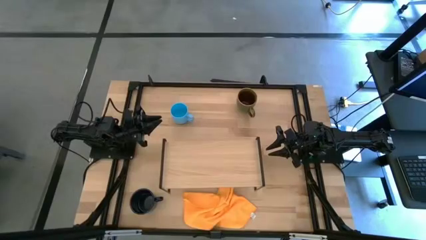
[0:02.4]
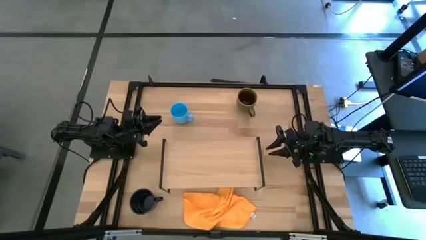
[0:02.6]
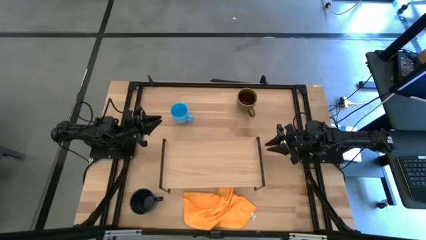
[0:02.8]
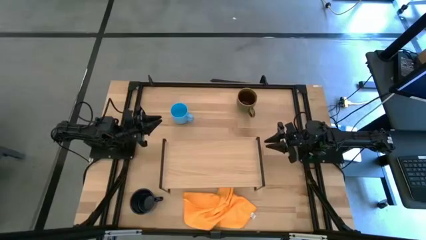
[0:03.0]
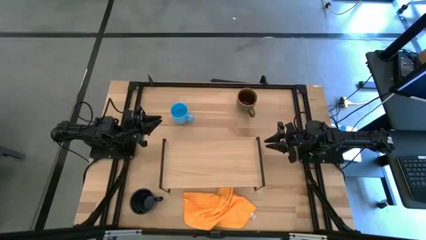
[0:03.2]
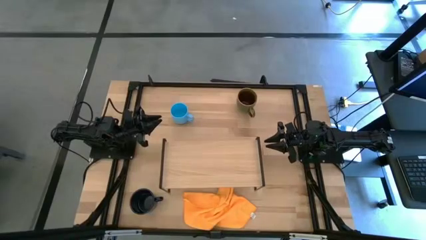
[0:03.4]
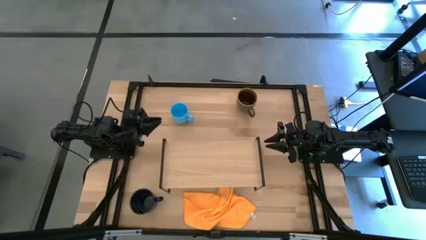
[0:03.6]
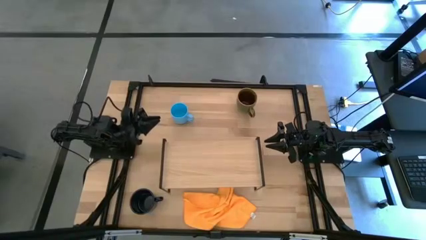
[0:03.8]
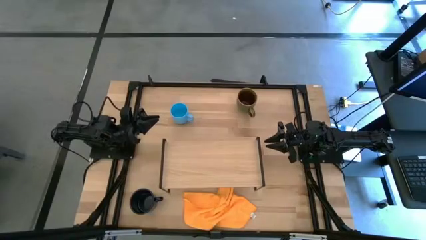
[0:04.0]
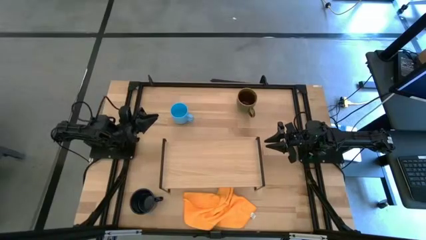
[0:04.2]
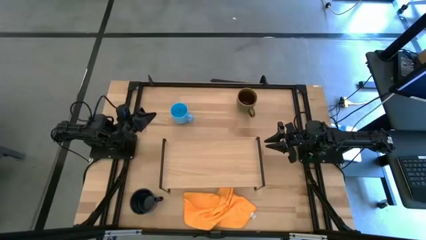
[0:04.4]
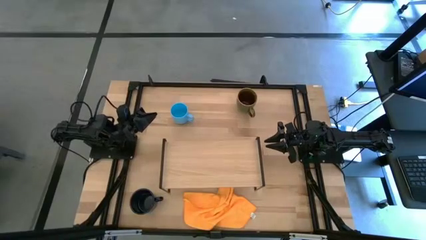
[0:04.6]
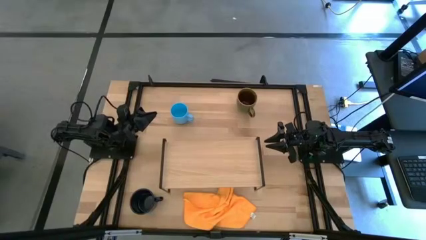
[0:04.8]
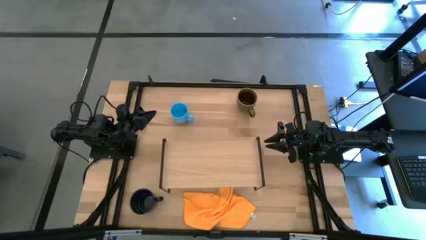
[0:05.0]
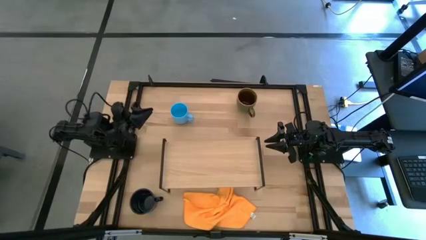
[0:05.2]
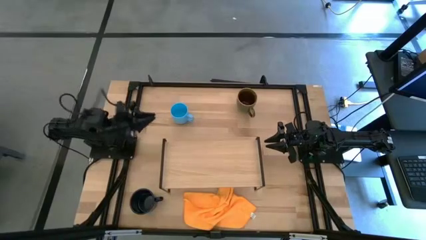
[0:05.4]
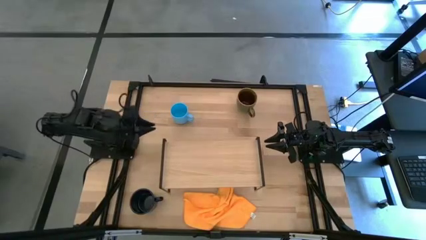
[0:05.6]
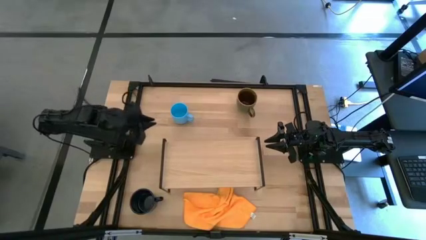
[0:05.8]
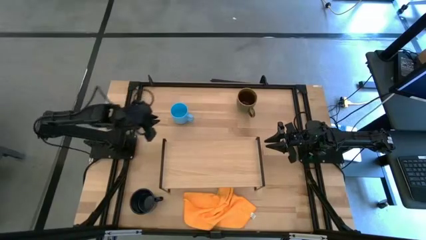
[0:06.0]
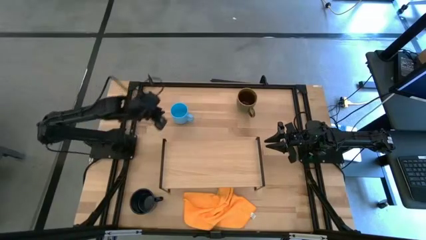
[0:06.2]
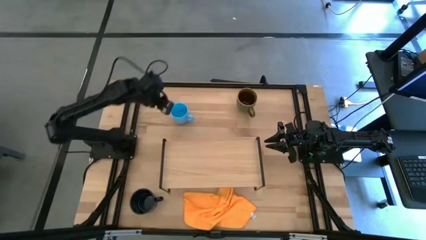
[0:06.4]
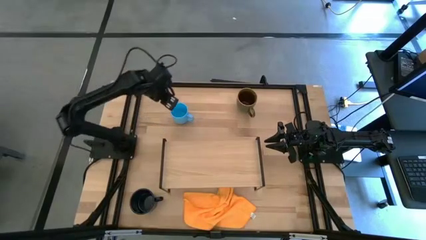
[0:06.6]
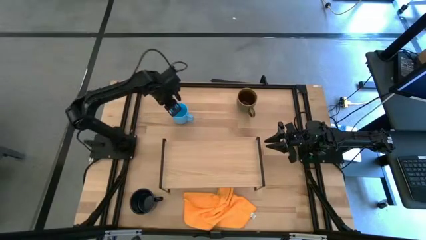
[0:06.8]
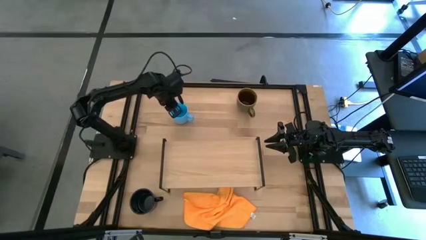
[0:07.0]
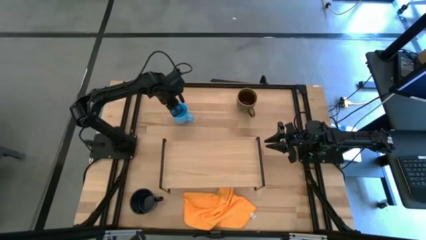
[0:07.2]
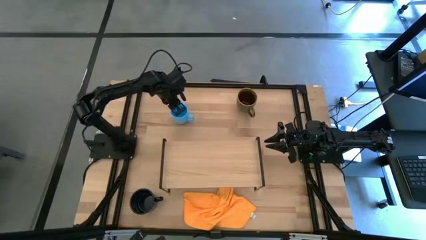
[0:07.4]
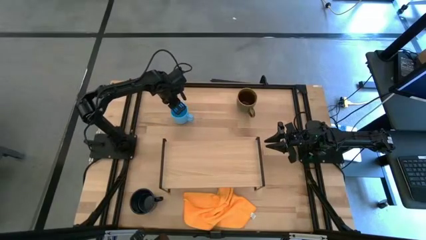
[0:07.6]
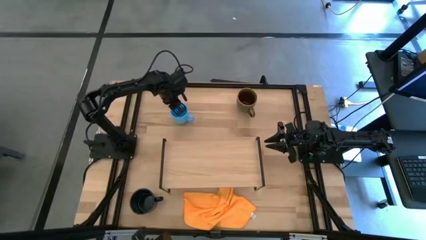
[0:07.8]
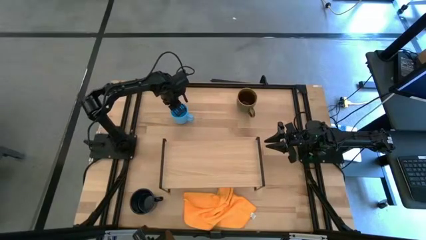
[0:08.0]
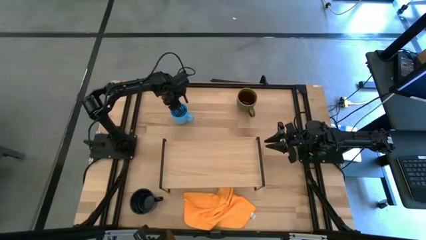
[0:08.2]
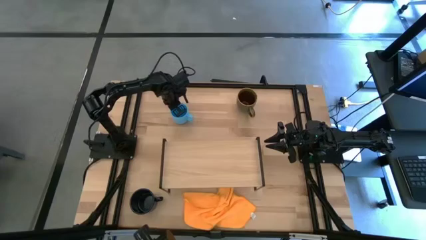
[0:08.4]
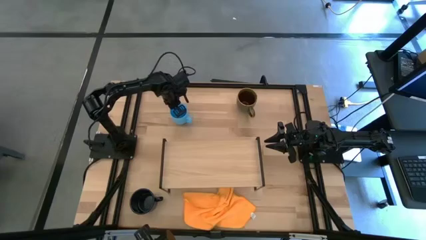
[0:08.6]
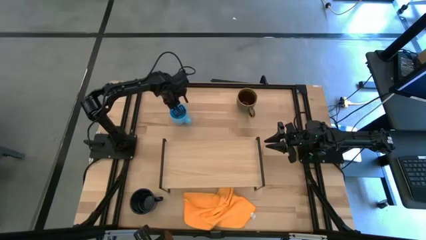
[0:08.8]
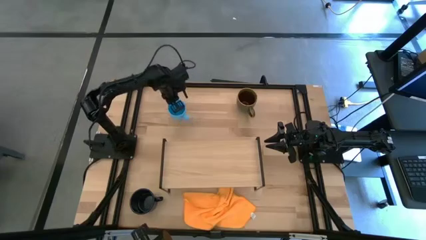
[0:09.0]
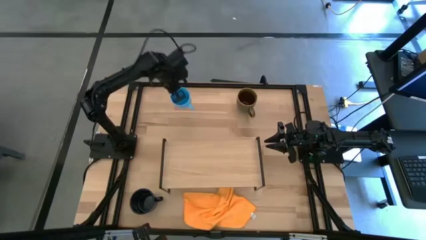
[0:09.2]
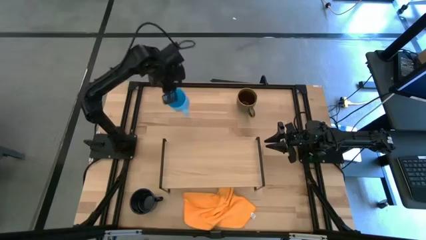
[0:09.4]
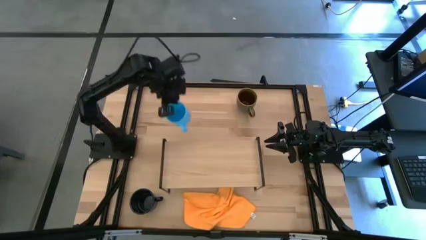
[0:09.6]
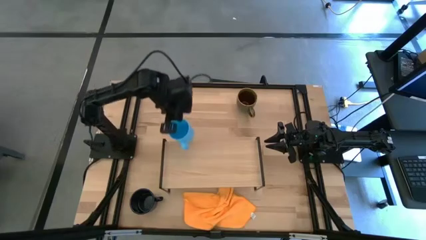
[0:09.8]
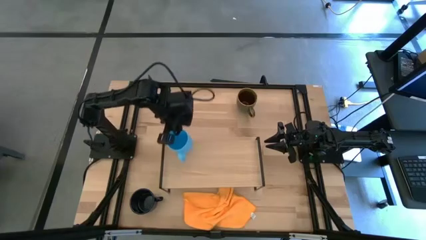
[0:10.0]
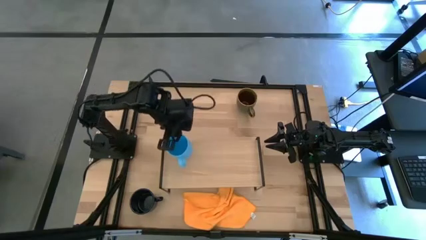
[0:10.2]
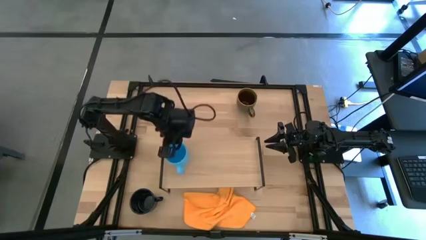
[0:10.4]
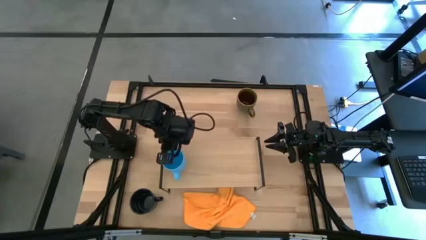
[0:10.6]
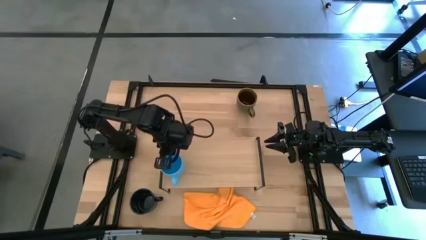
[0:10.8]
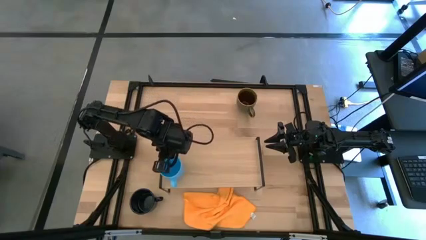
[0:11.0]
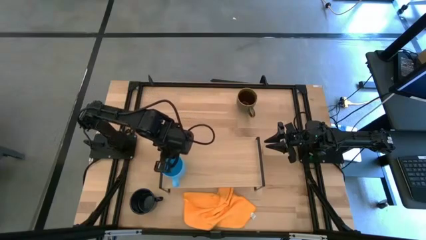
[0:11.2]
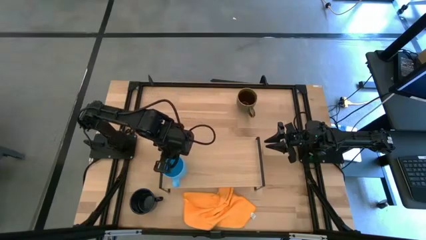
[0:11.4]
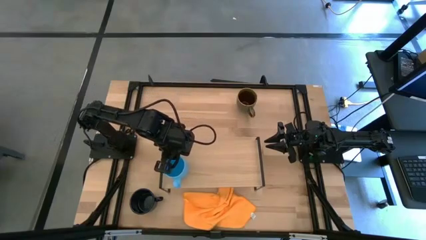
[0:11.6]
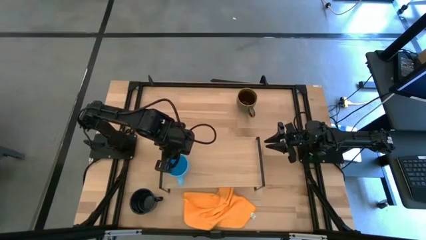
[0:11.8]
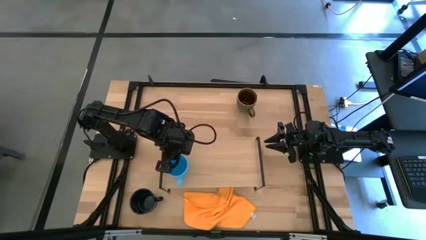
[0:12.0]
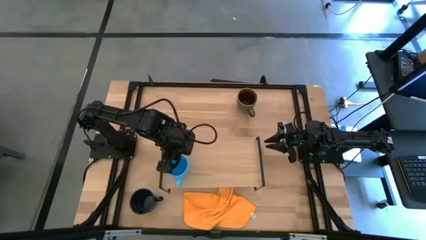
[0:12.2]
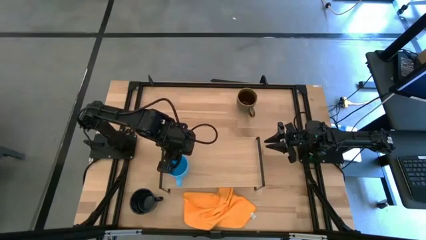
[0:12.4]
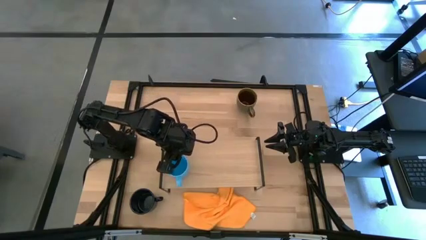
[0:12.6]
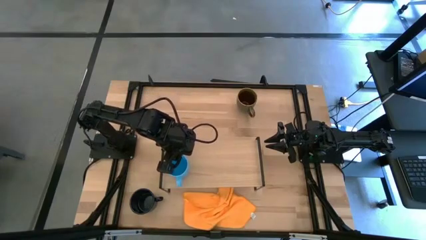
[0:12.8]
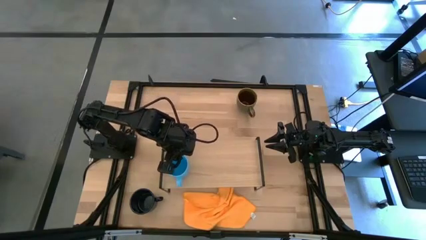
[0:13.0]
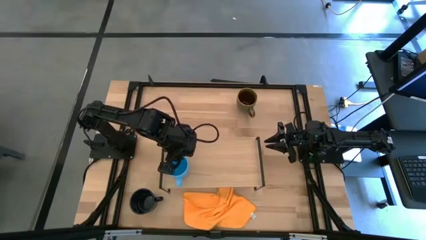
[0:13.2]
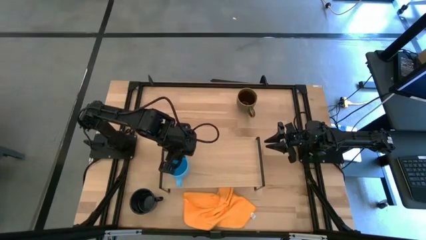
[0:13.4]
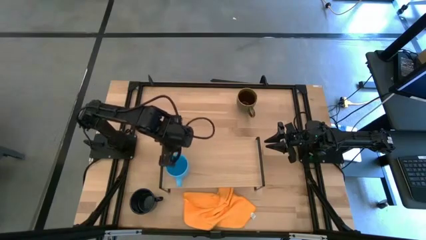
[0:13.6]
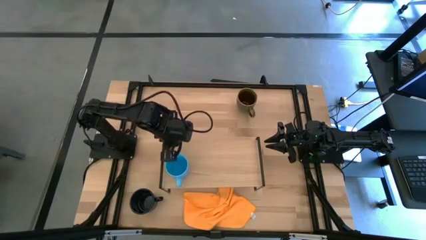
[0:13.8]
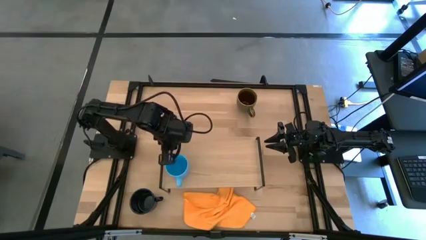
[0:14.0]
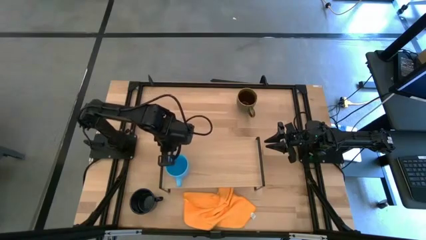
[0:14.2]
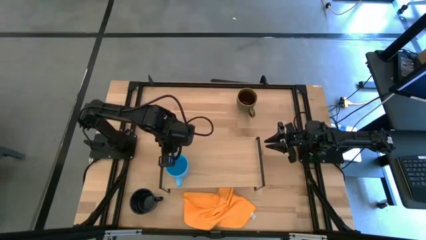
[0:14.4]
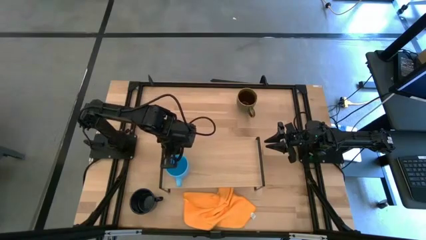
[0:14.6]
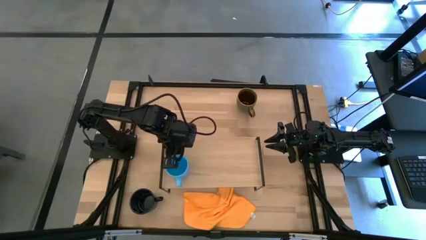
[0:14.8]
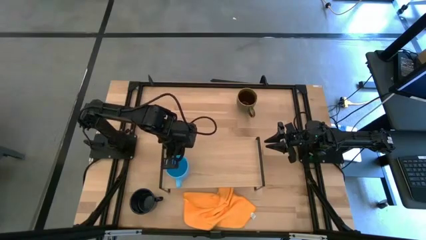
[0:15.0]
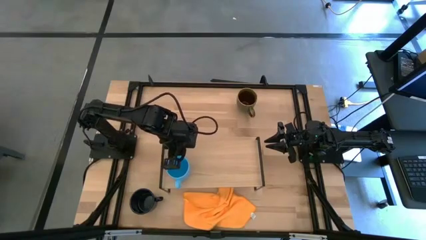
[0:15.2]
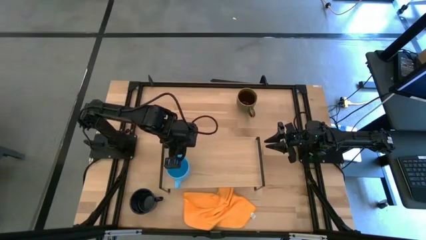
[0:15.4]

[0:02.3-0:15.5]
Task: Stack small to large cups/mugs on shelf
Put the blue mug on the shelf
